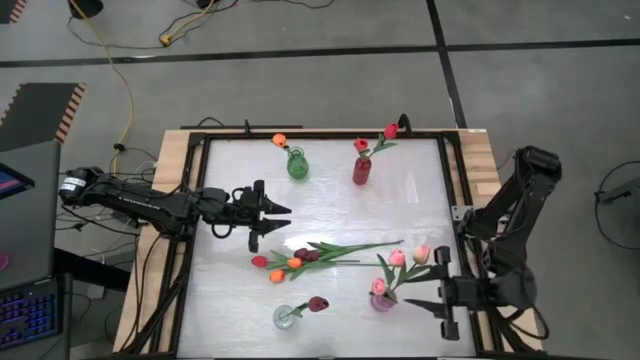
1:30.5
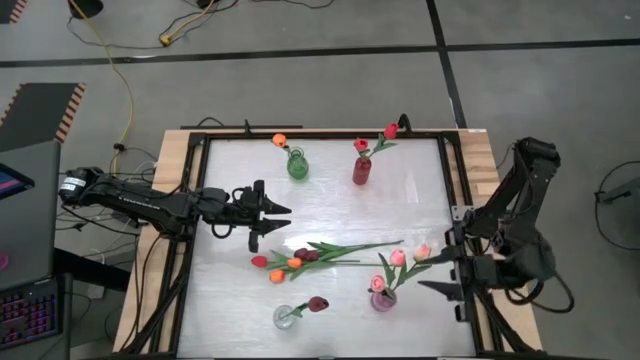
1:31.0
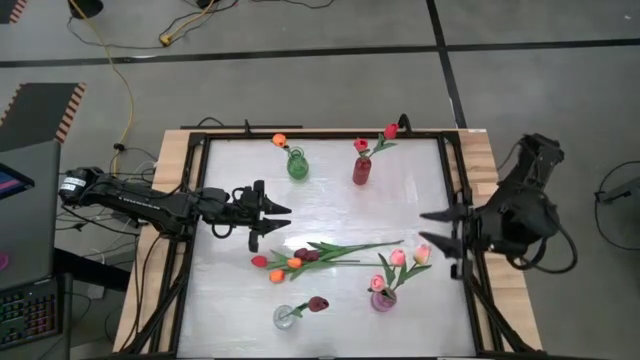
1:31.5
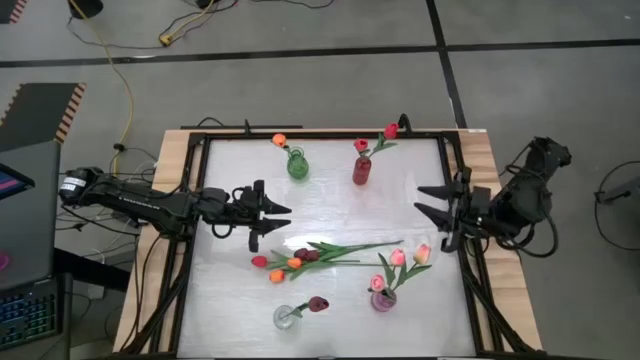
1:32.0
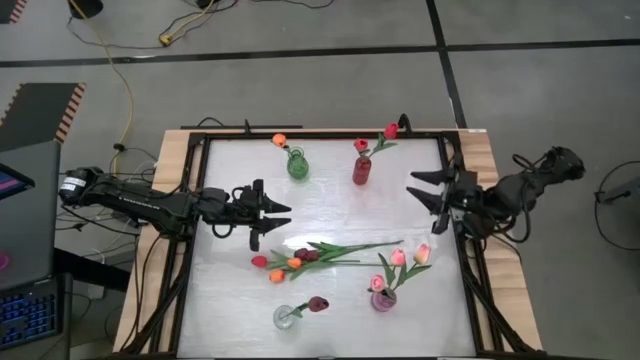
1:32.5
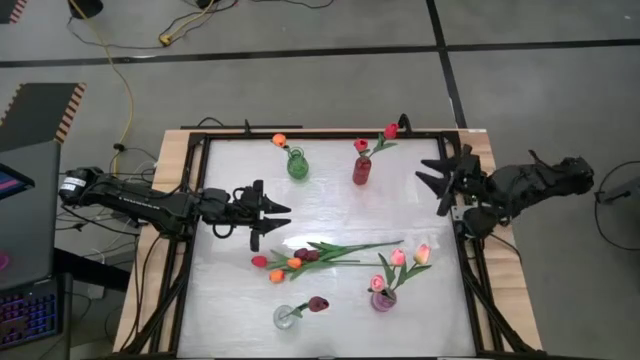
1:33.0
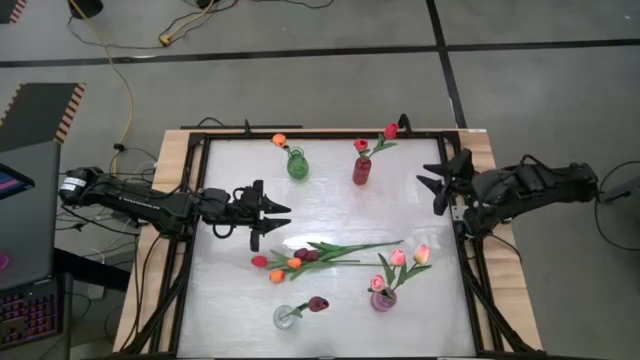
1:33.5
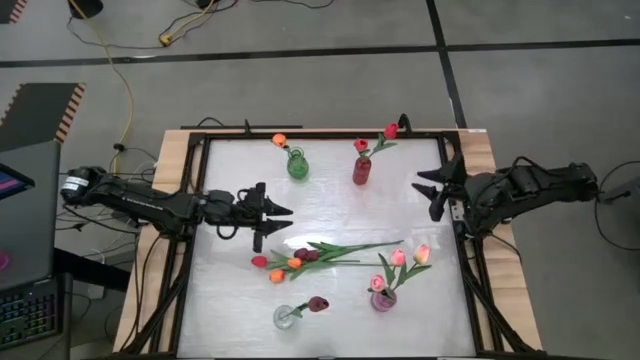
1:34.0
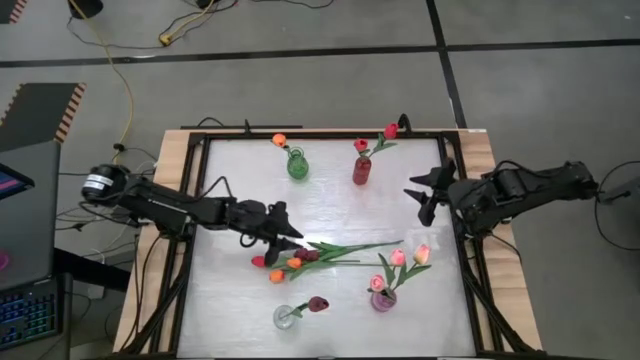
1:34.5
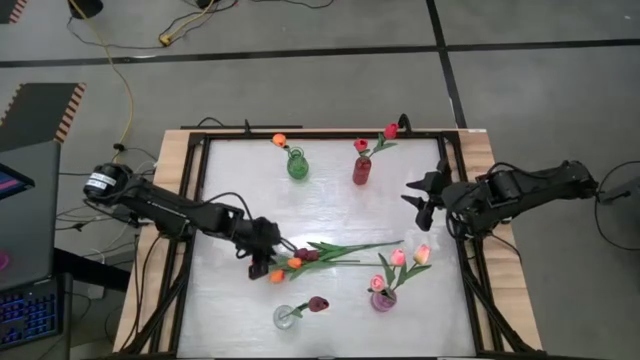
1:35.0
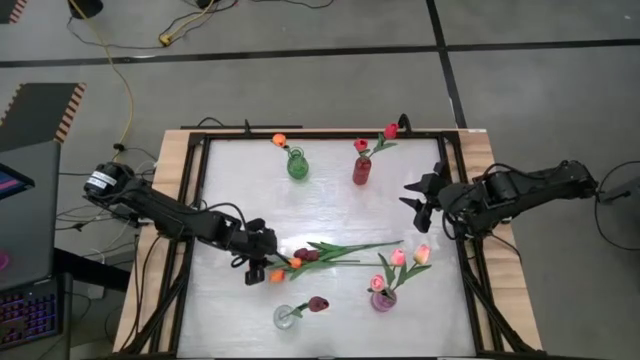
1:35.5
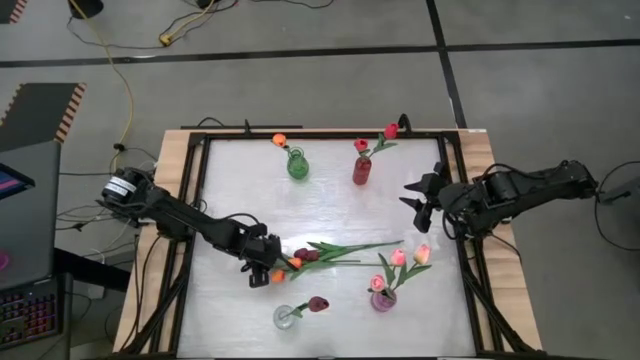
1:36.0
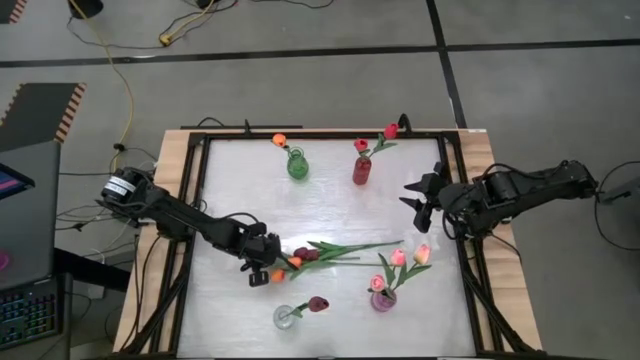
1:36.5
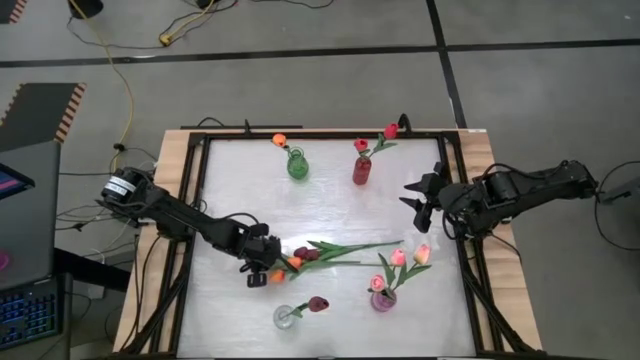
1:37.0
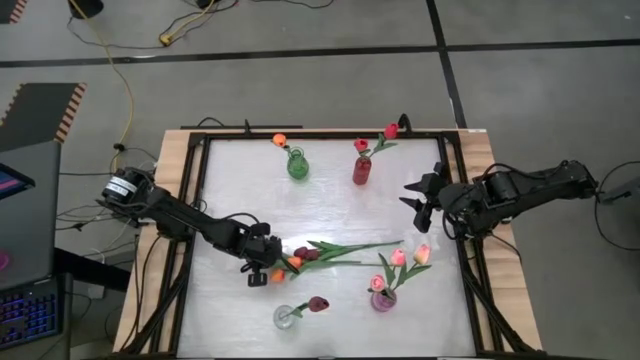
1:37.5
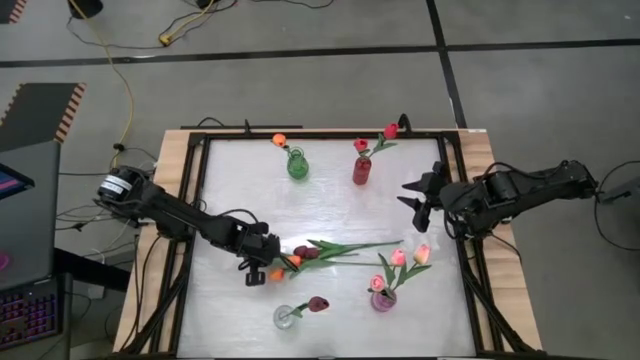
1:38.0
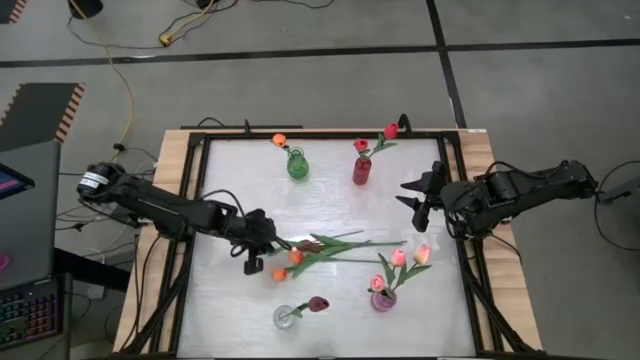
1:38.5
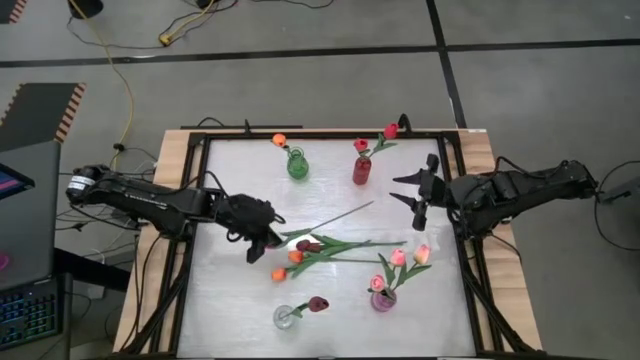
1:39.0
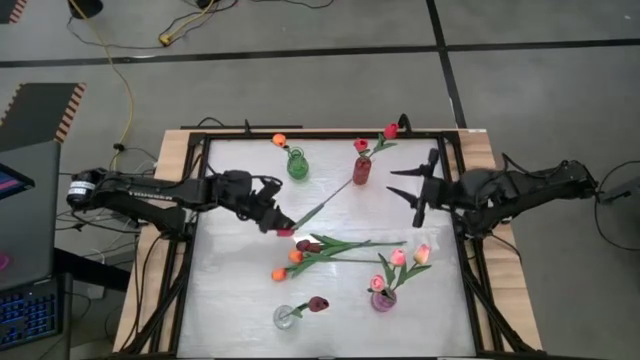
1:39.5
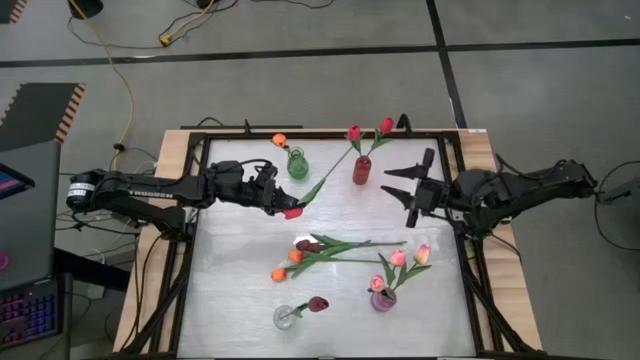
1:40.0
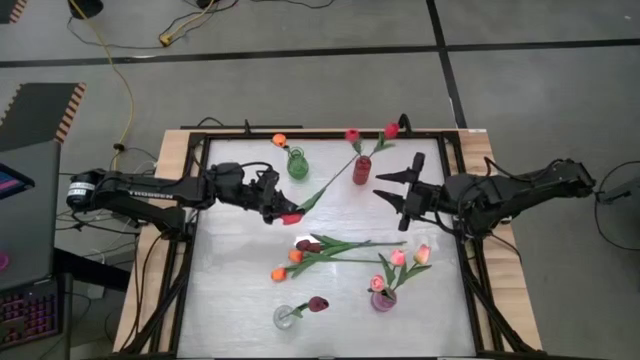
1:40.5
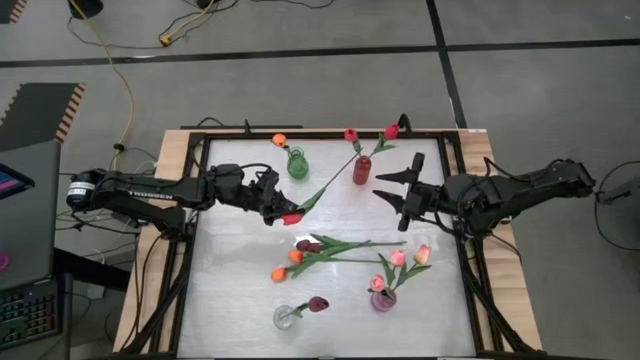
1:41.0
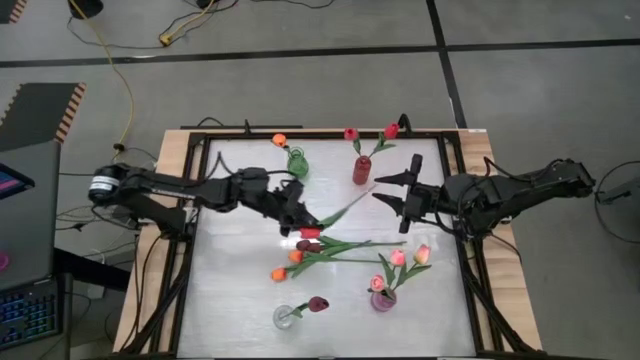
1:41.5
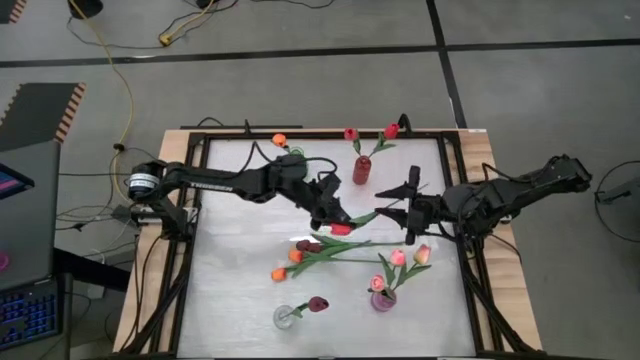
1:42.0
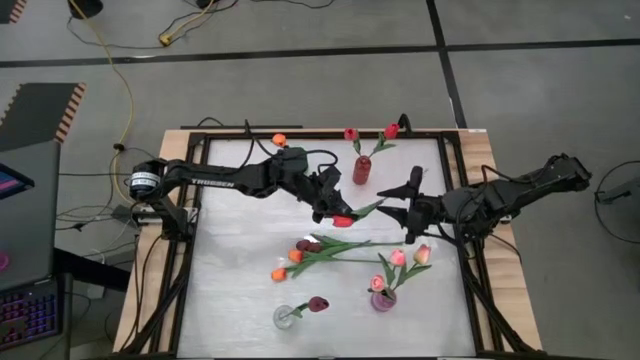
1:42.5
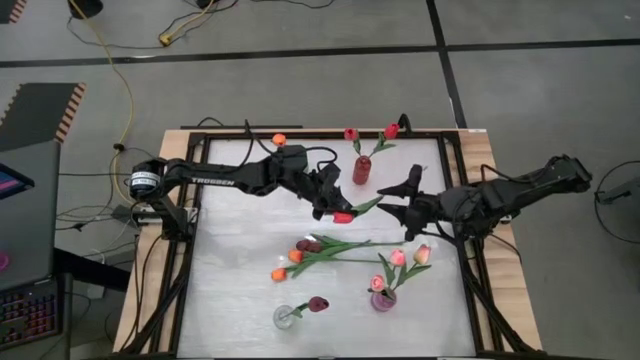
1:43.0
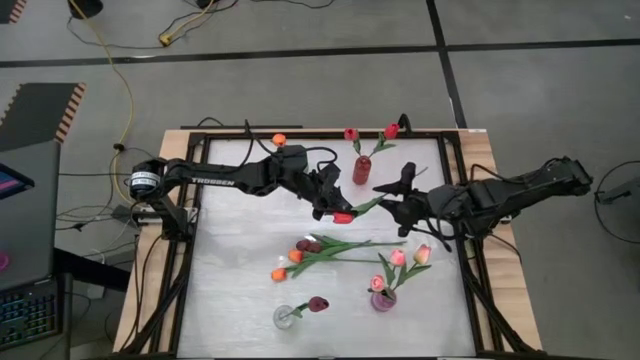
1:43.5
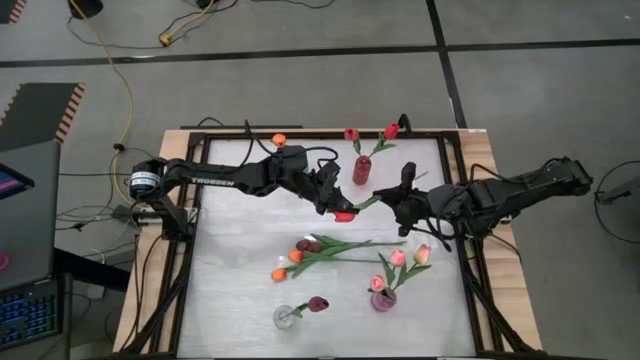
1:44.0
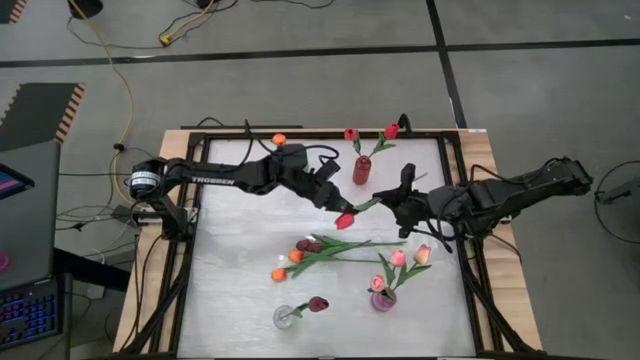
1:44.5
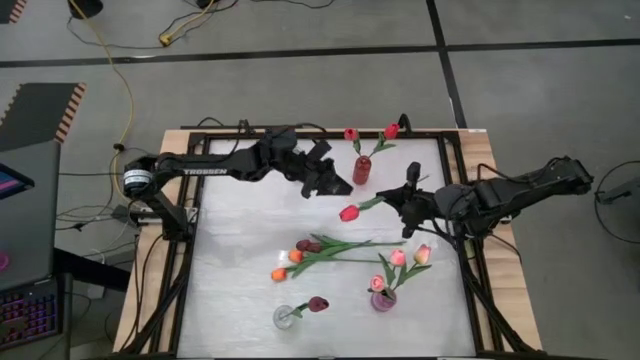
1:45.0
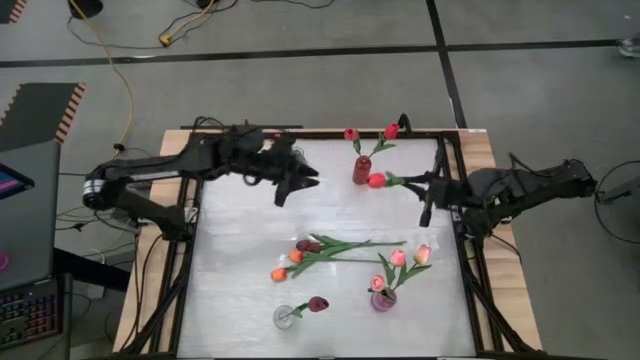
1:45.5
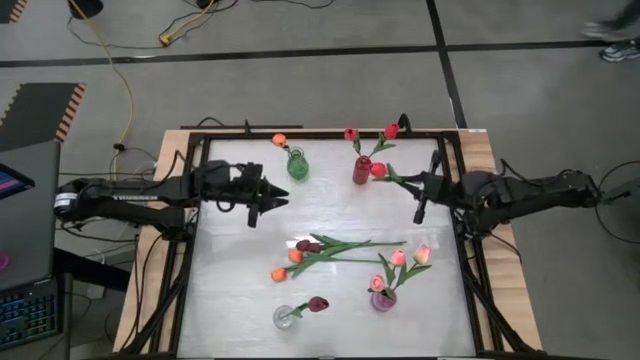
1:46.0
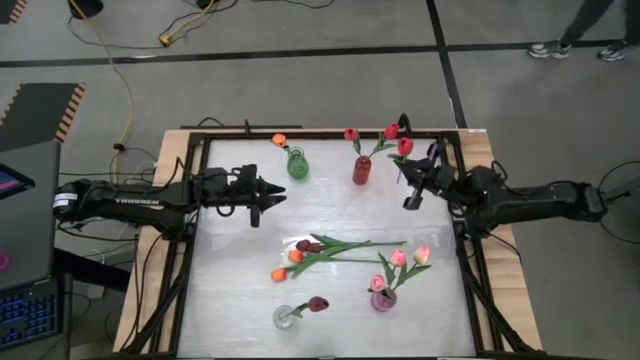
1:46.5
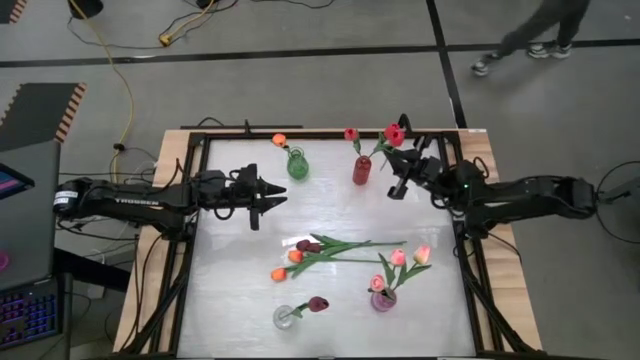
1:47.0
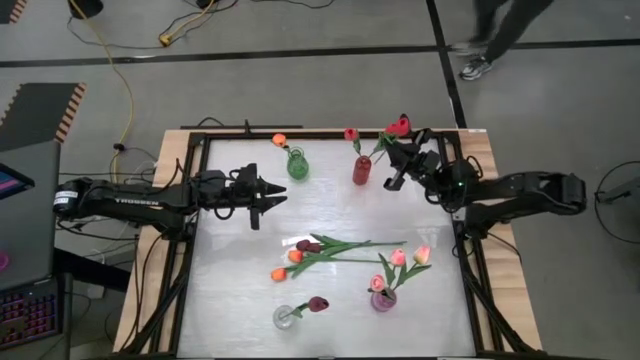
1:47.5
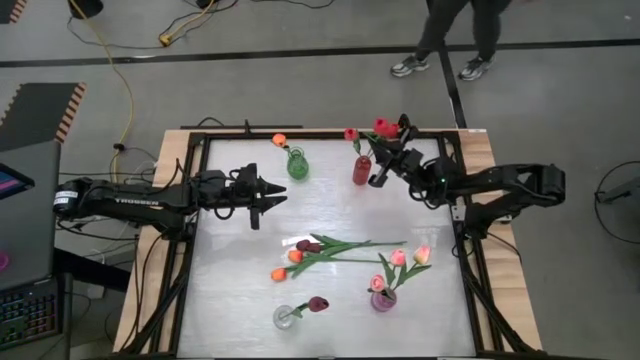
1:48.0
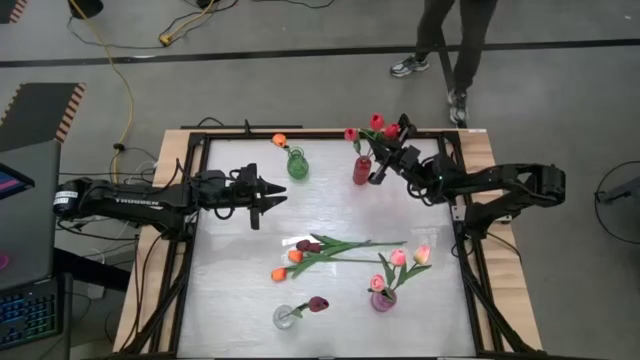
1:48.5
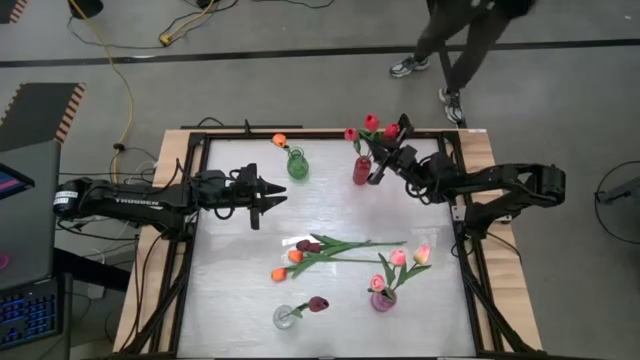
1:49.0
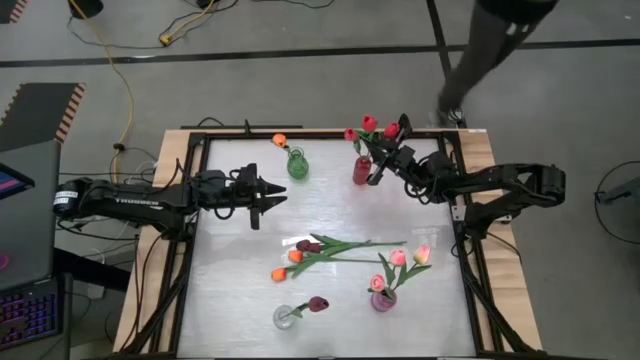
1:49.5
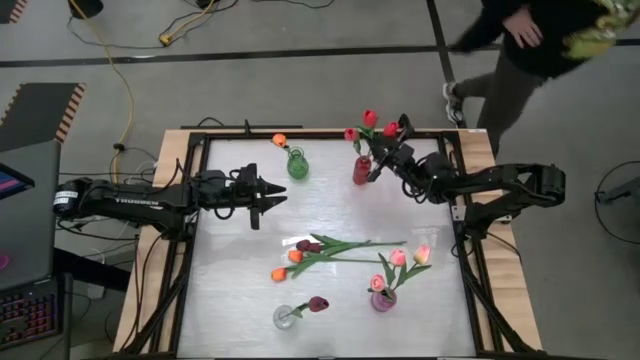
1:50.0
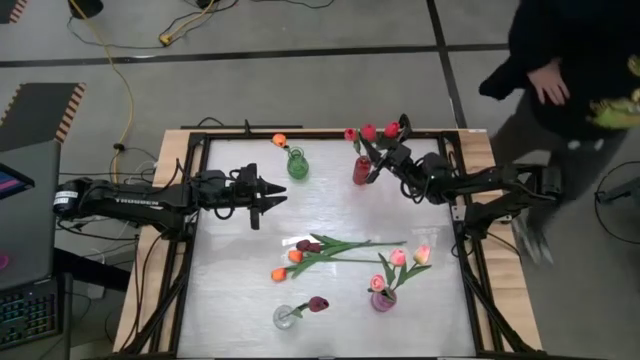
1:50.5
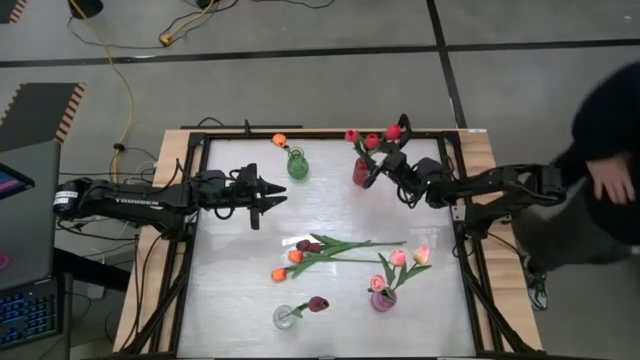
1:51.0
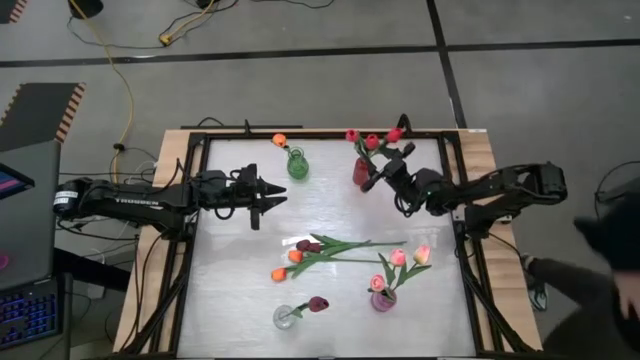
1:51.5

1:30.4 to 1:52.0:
Task: Sort flowers into vase by color
Put the red flower into the red vase
